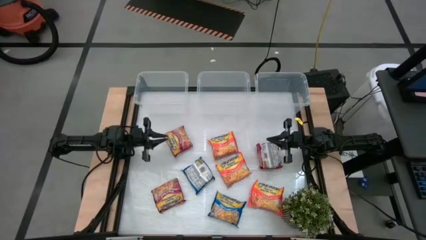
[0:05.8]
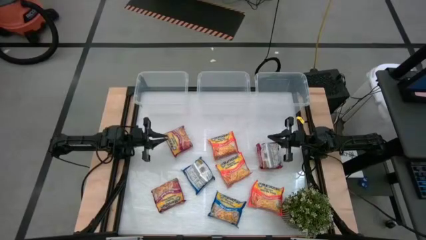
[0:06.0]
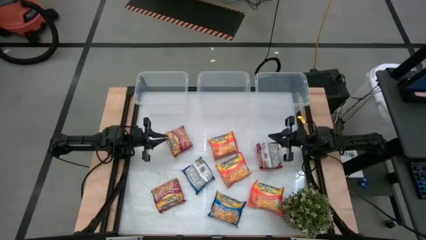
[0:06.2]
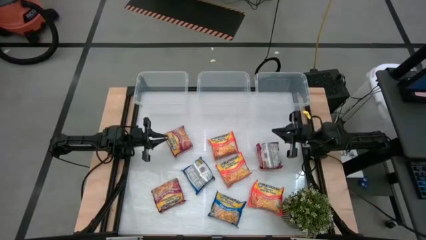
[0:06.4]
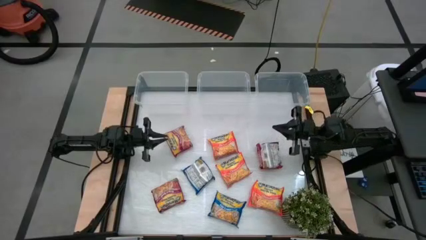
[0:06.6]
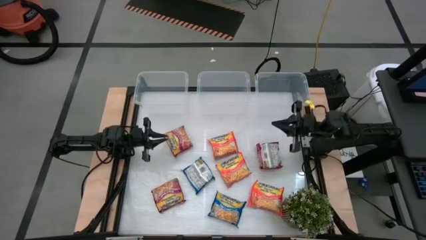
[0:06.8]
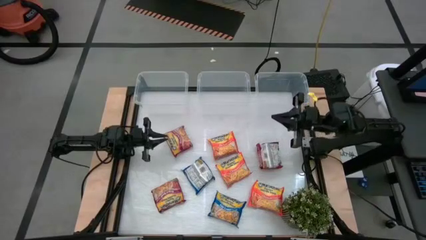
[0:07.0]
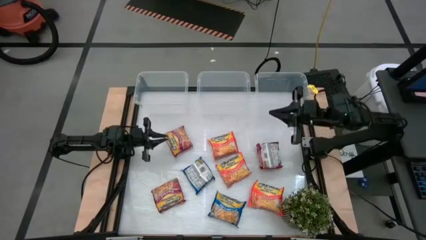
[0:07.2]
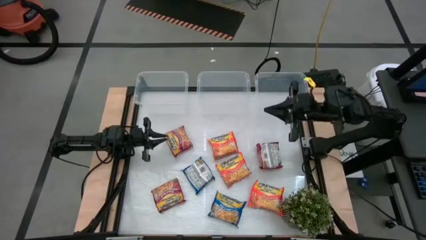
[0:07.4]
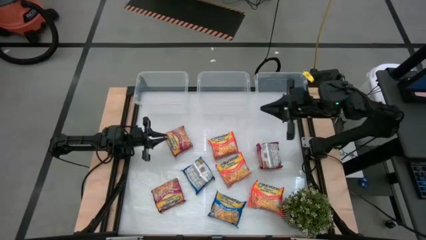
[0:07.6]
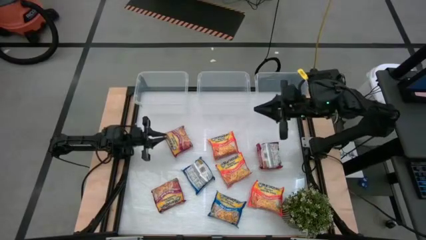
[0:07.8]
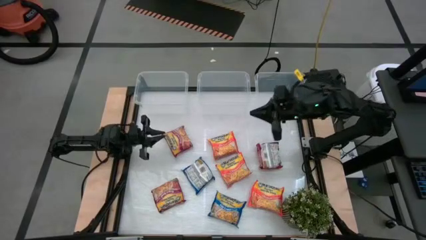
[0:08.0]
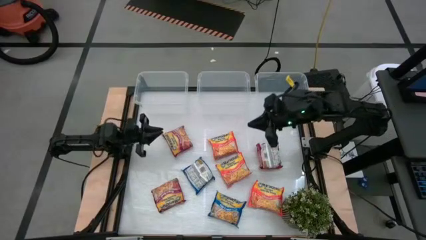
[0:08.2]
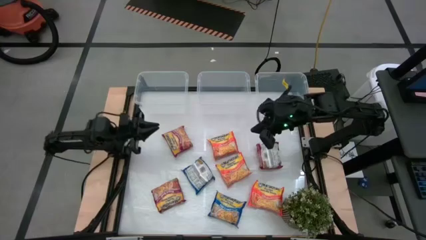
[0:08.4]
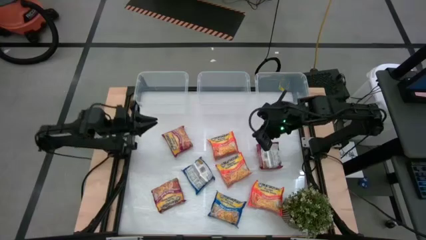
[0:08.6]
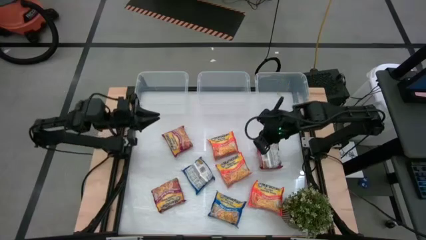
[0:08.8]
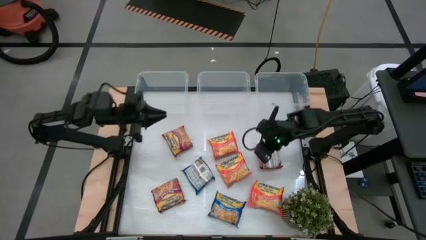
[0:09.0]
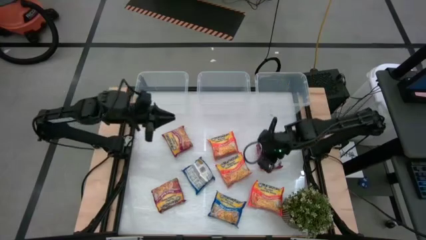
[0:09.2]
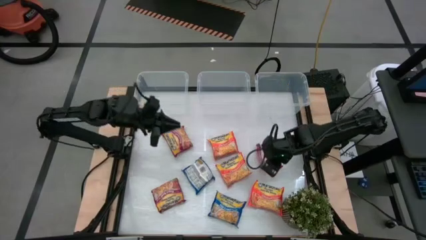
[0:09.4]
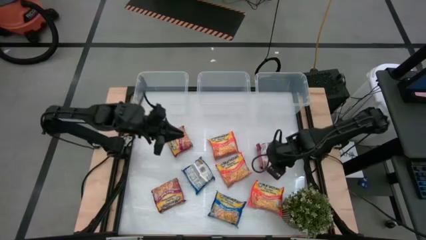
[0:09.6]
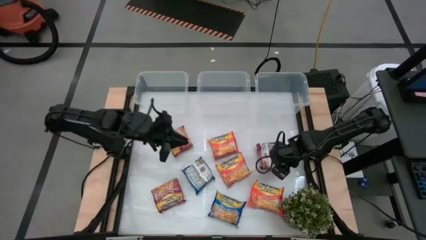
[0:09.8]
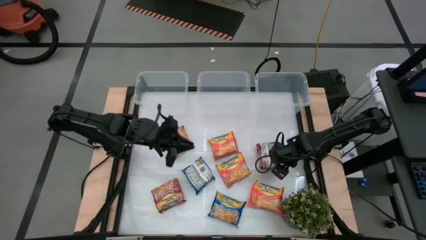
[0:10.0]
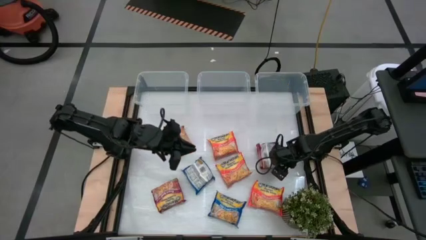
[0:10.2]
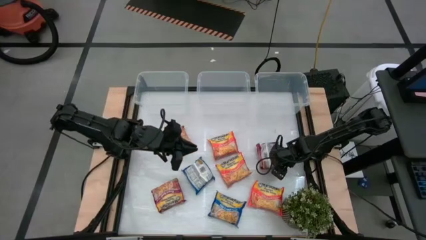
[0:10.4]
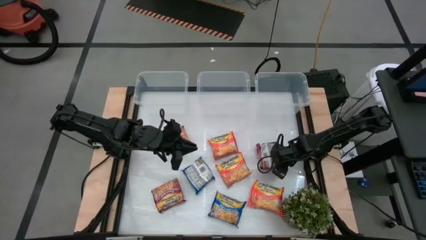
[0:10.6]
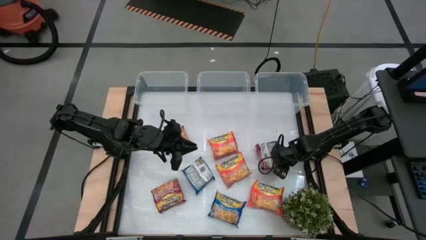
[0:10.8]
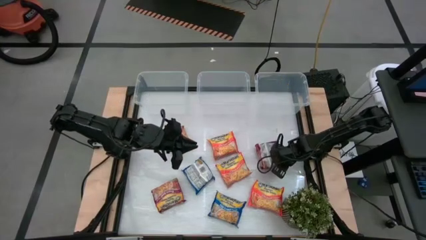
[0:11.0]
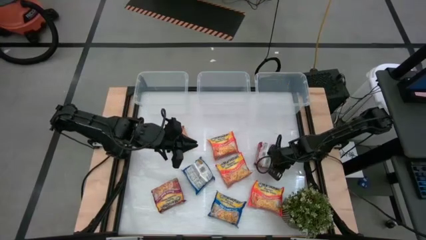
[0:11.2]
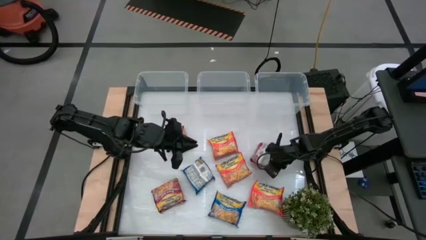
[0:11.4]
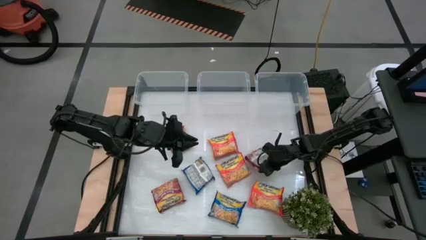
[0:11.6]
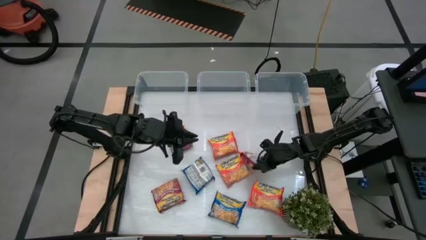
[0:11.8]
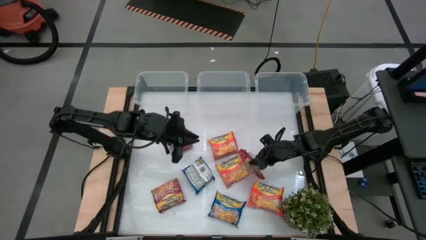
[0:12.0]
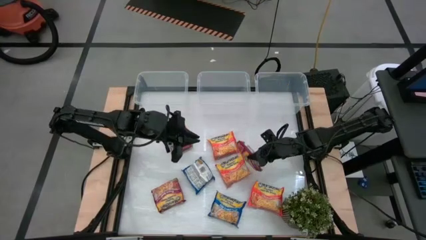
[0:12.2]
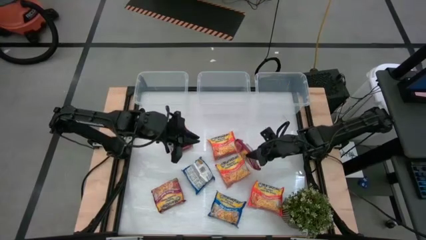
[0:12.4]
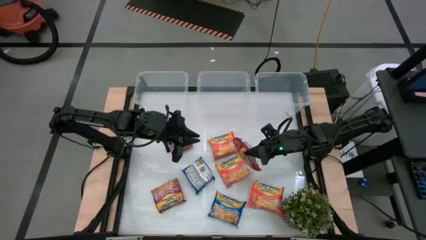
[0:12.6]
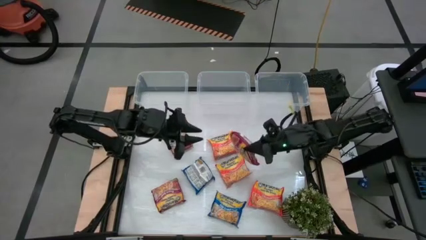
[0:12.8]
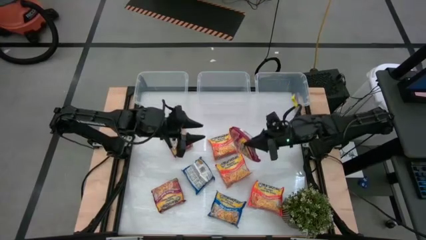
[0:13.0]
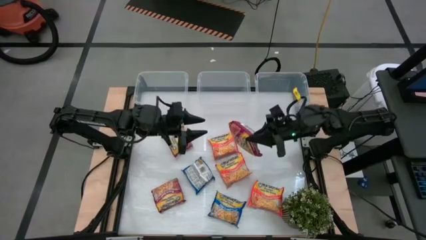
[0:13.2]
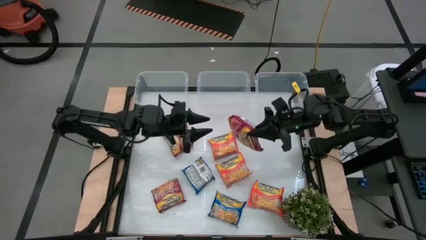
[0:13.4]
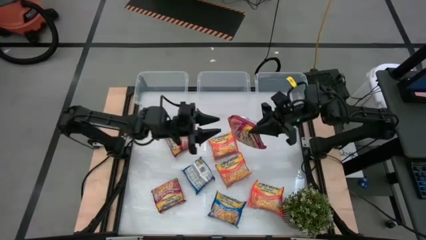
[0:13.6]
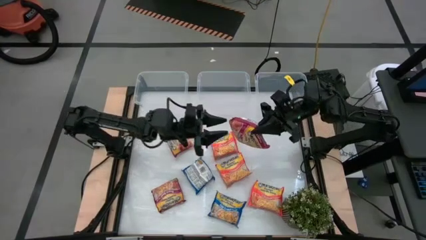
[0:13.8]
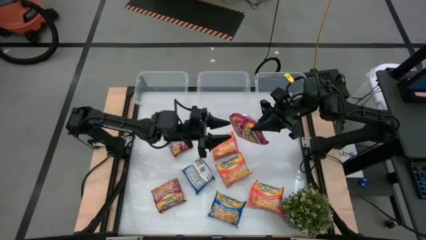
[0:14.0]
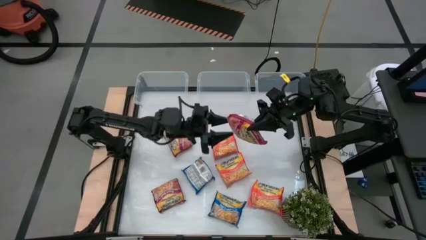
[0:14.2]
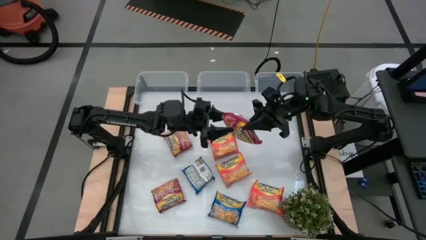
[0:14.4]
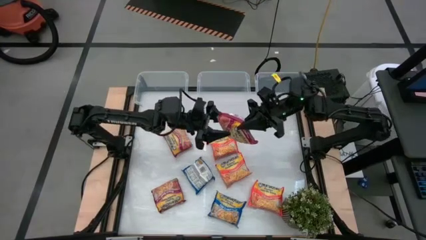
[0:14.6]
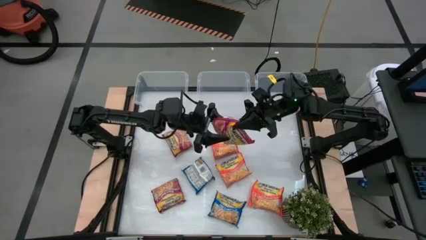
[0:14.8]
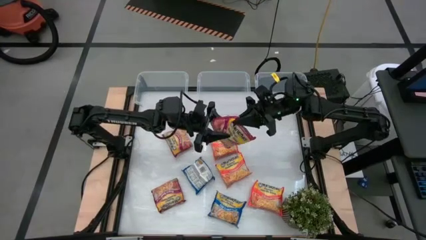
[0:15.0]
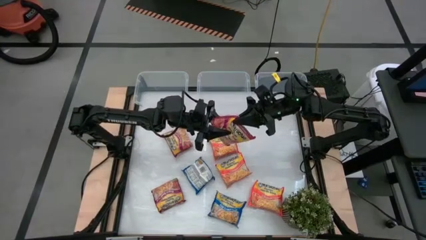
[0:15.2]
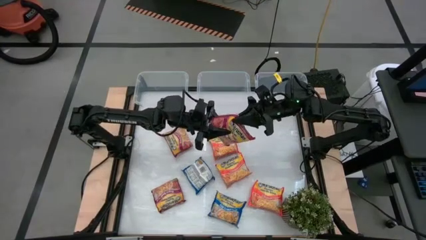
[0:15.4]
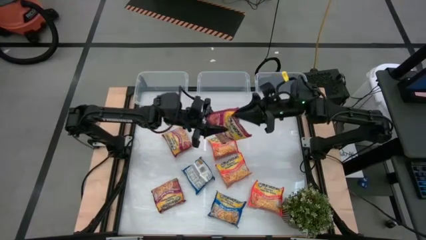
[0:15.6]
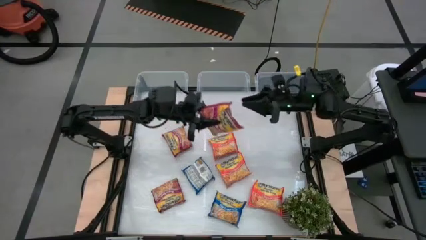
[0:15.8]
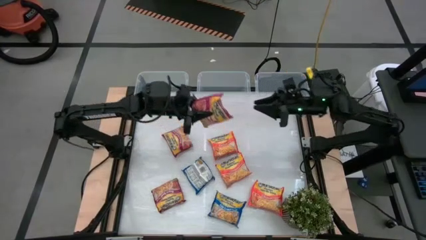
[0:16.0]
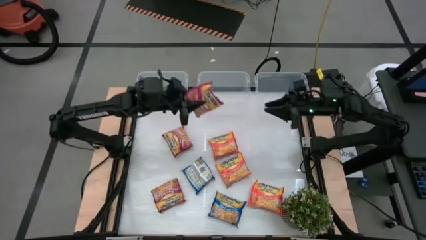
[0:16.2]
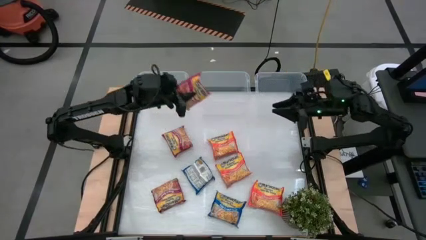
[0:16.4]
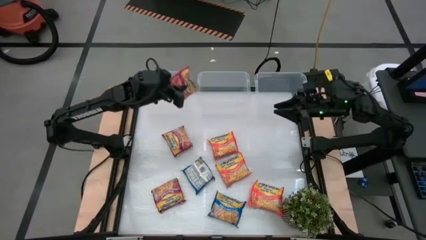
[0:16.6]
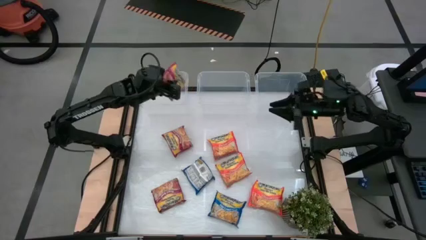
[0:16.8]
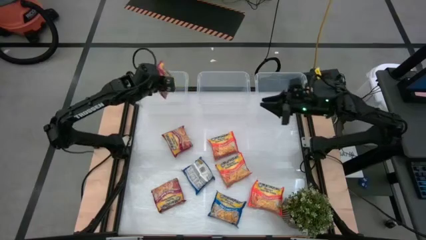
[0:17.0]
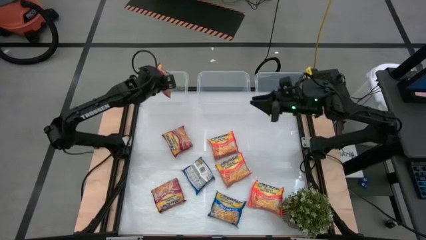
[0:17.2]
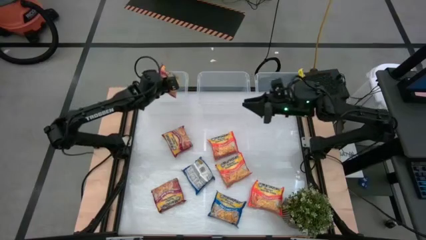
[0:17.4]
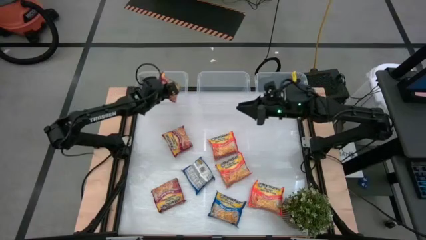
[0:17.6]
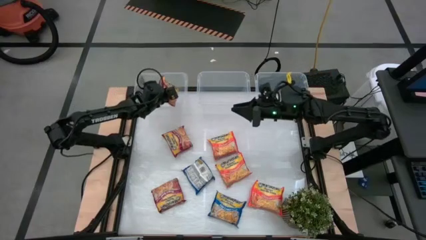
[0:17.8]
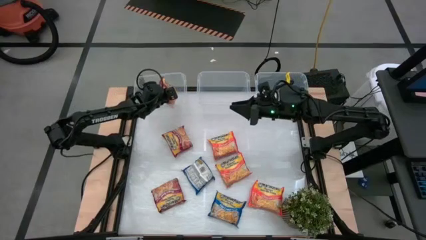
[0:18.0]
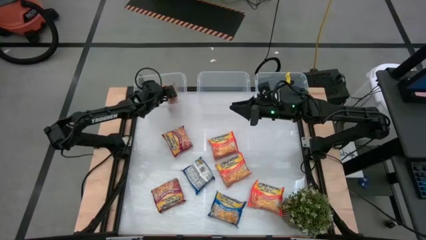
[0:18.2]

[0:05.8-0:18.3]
Task: Sort Maruchan noodles
Put the middle red noodle pack into the left transparent bin

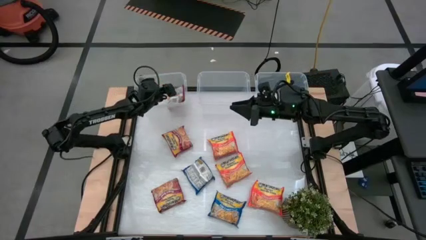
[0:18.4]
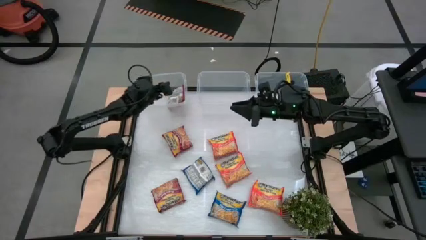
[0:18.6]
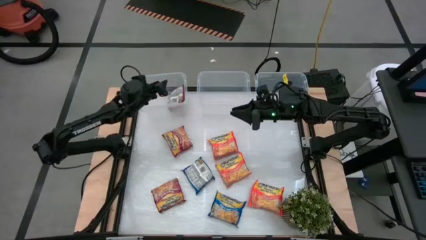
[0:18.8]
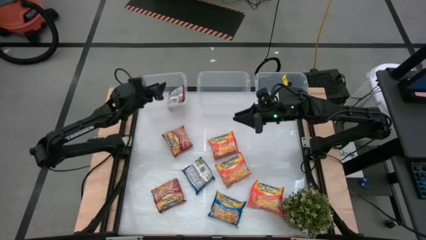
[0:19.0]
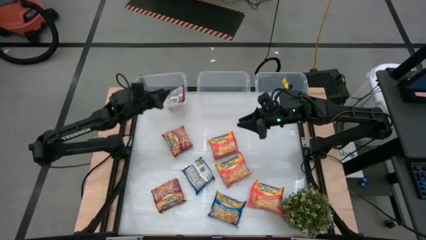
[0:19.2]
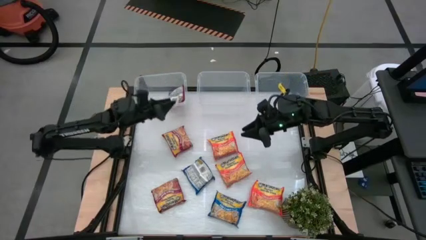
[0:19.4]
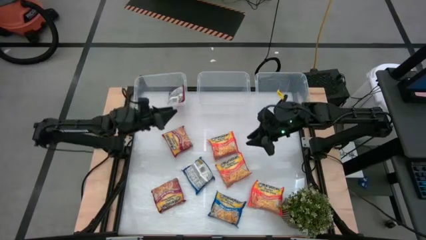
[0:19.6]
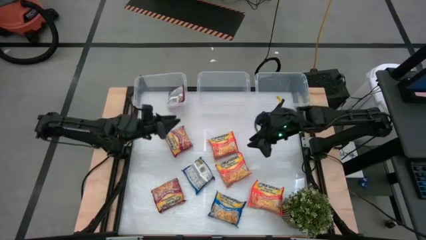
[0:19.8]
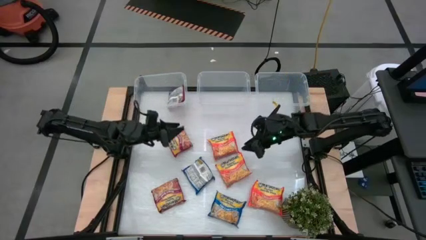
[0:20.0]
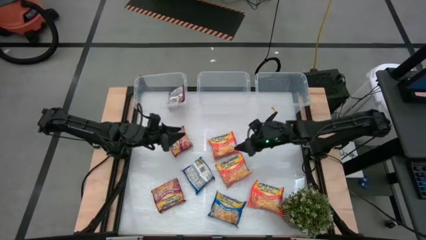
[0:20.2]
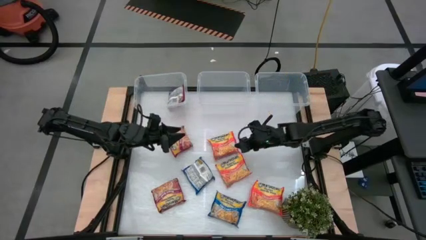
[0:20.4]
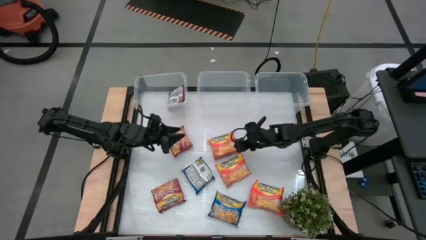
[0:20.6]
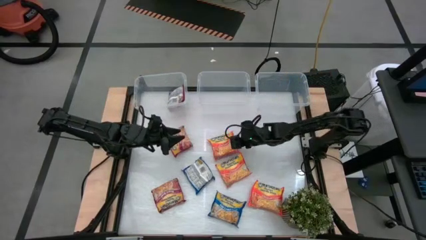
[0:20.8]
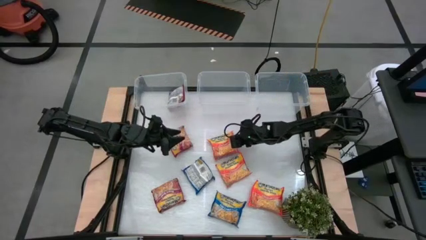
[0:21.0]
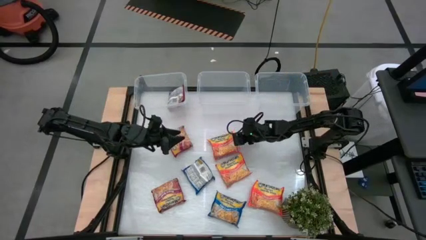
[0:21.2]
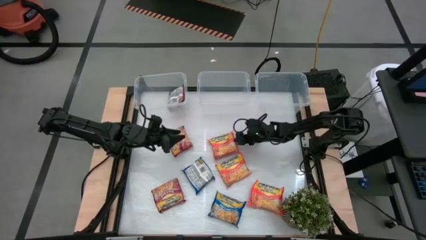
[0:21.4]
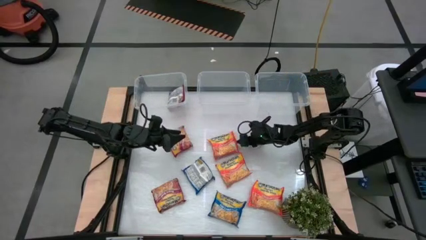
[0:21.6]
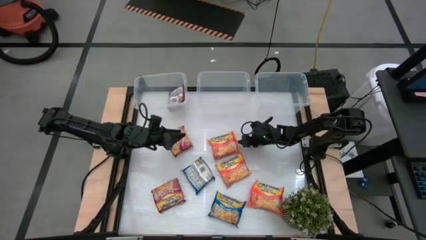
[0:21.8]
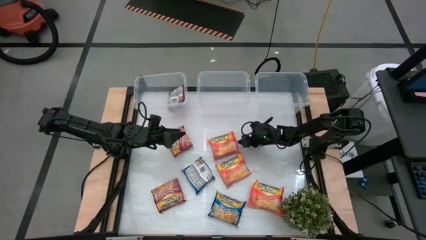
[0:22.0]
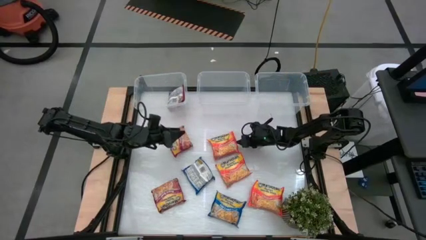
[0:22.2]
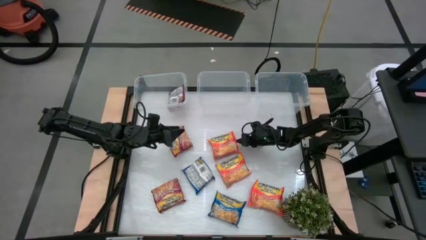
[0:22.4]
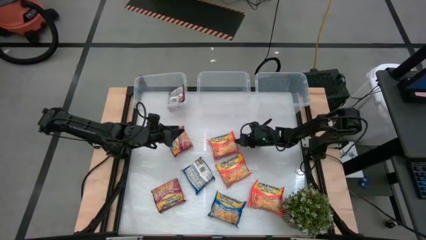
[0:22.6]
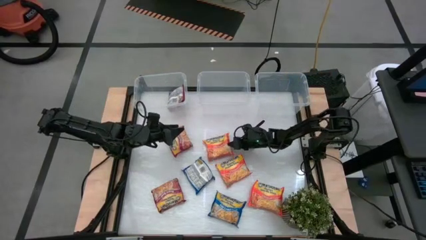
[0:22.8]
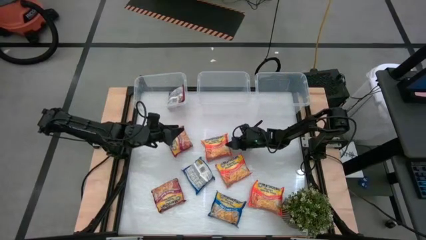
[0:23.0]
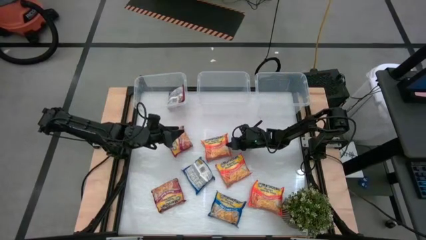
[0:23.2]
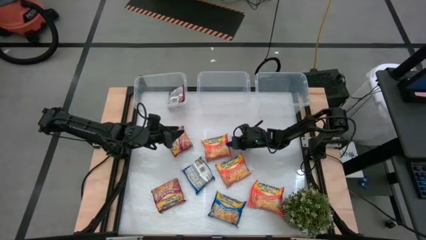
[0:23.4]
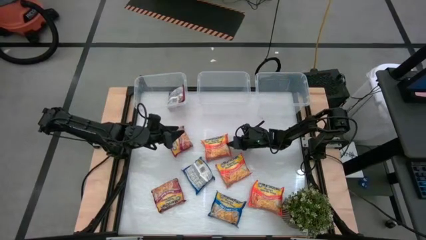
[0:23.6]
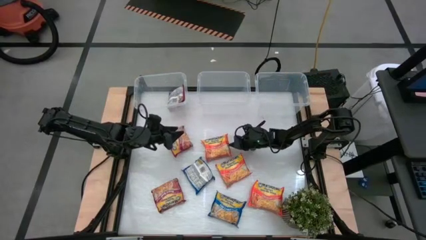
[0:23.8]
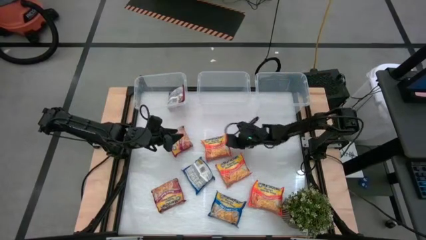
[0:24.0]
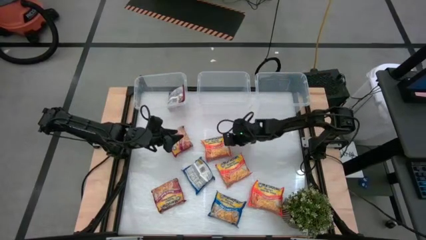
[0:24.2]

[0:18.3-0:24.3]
Put the top orange noodle pack into the right transparent bin
